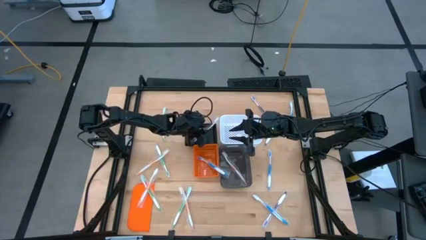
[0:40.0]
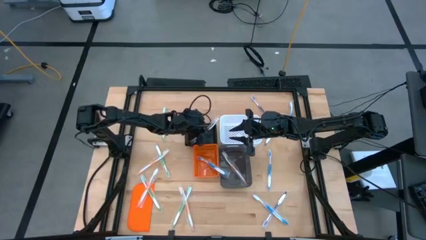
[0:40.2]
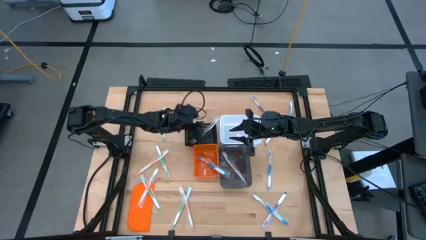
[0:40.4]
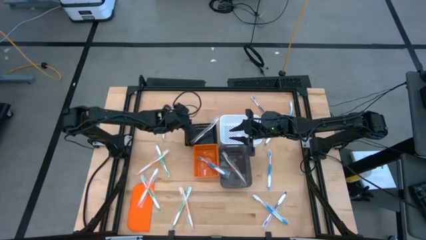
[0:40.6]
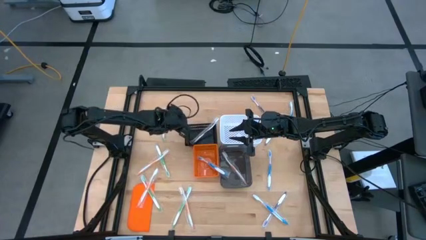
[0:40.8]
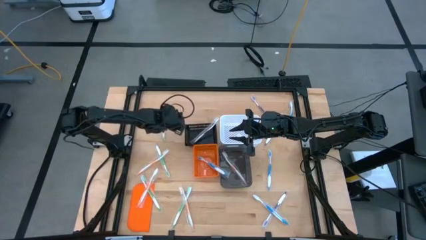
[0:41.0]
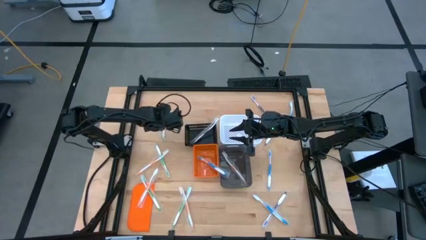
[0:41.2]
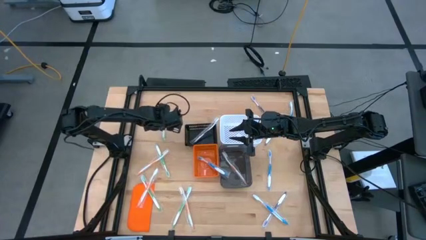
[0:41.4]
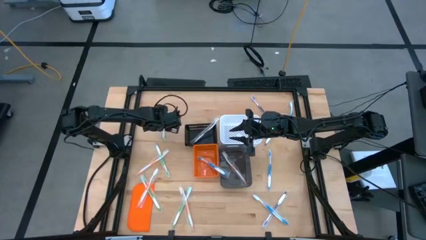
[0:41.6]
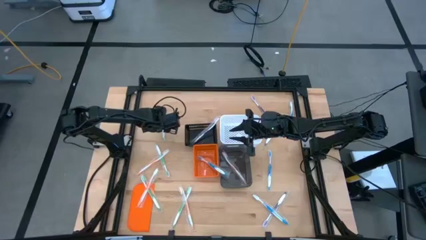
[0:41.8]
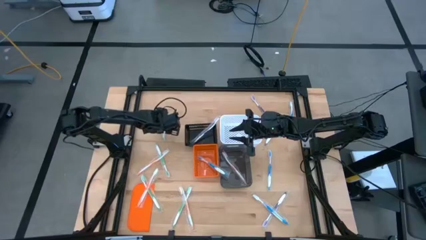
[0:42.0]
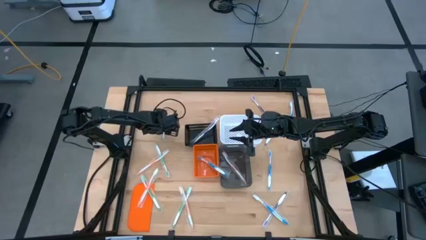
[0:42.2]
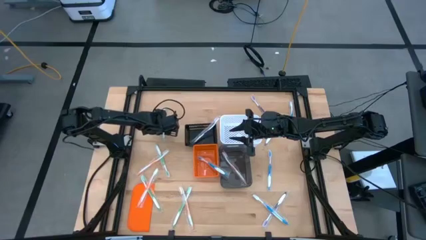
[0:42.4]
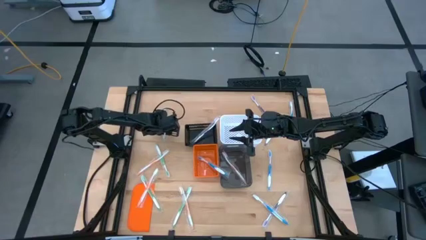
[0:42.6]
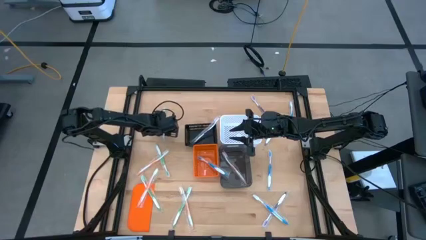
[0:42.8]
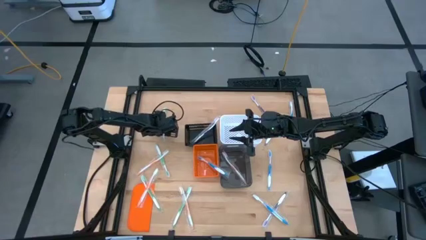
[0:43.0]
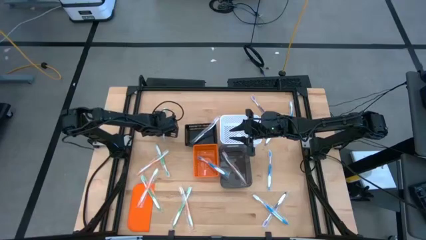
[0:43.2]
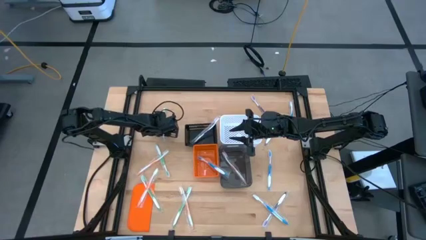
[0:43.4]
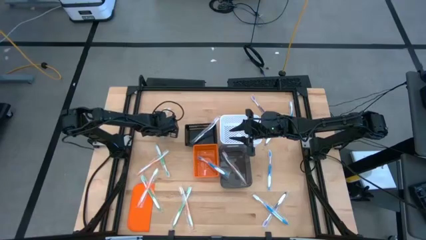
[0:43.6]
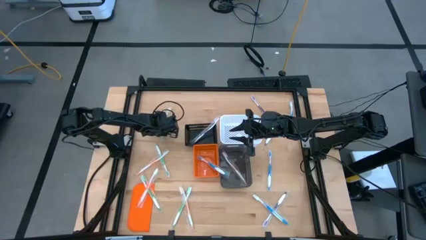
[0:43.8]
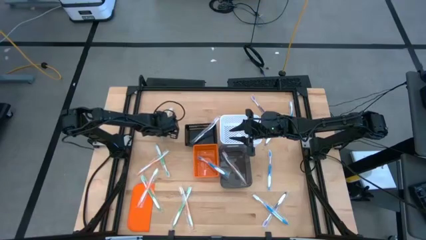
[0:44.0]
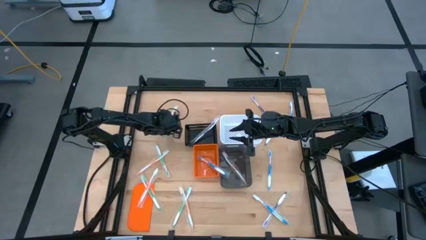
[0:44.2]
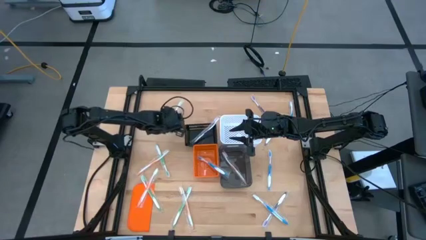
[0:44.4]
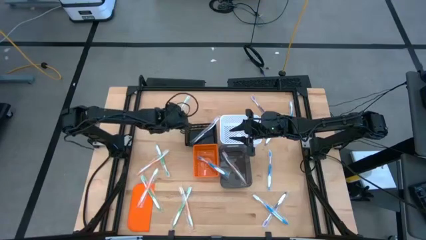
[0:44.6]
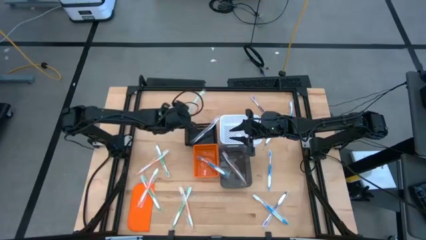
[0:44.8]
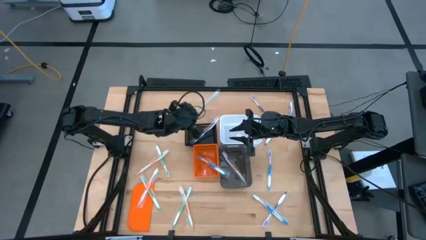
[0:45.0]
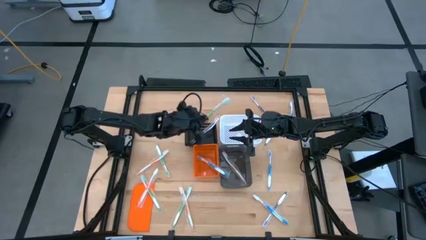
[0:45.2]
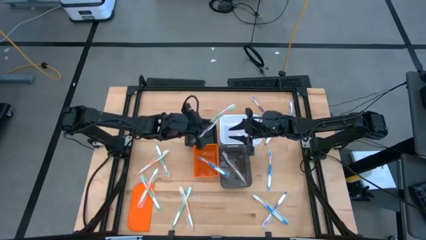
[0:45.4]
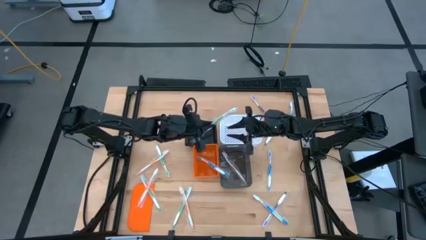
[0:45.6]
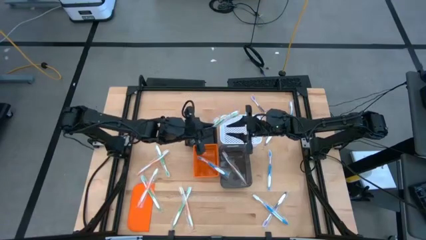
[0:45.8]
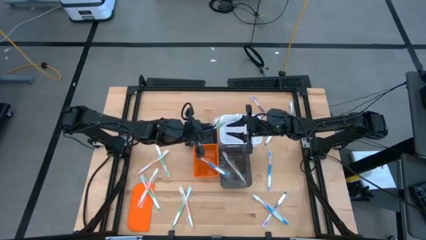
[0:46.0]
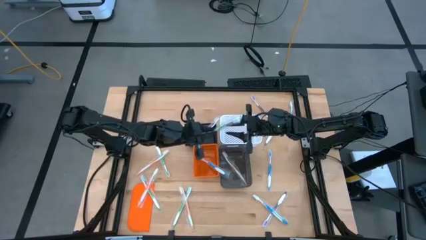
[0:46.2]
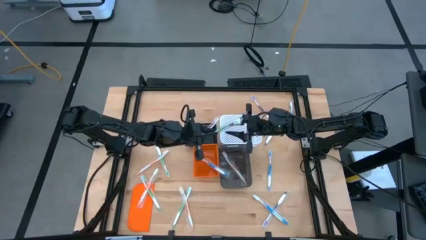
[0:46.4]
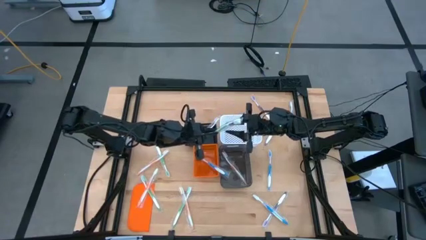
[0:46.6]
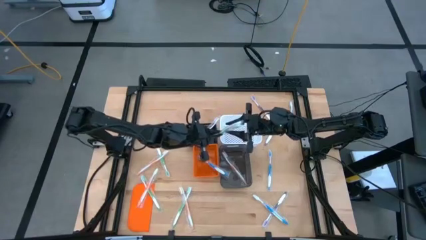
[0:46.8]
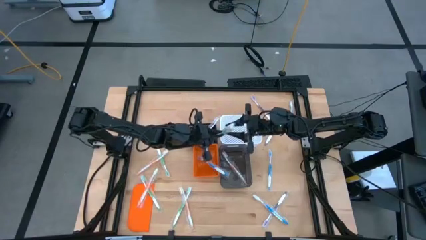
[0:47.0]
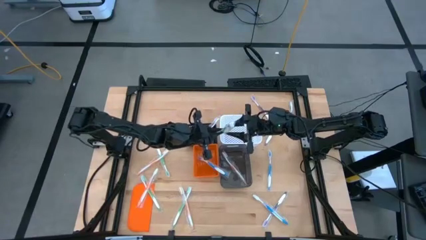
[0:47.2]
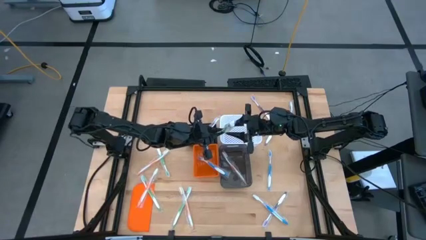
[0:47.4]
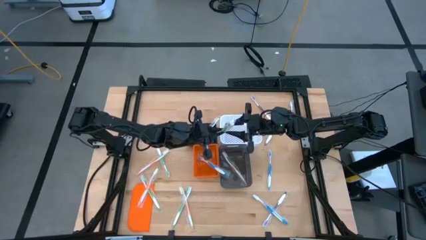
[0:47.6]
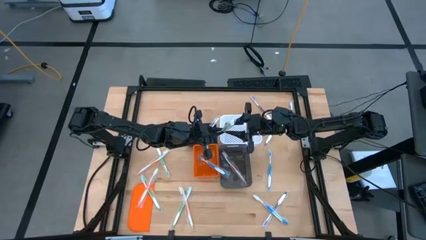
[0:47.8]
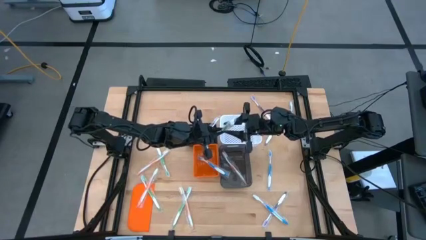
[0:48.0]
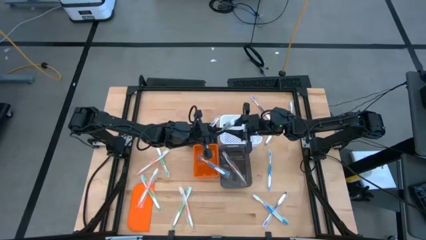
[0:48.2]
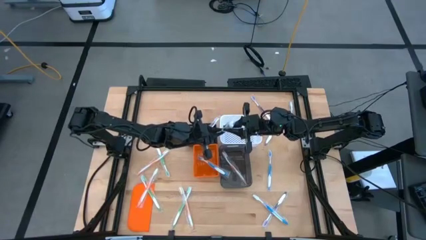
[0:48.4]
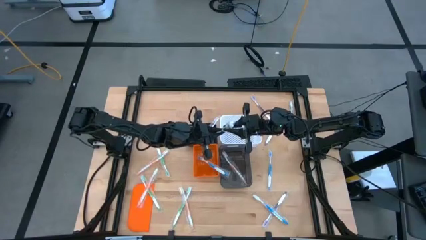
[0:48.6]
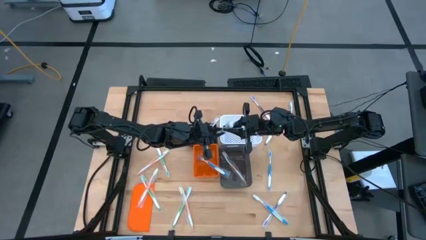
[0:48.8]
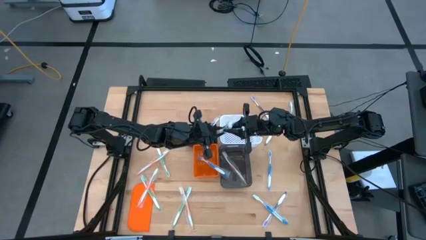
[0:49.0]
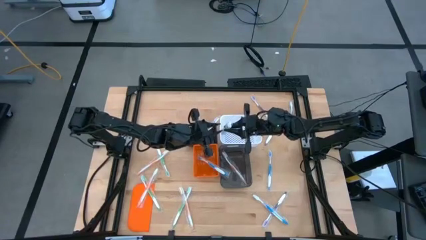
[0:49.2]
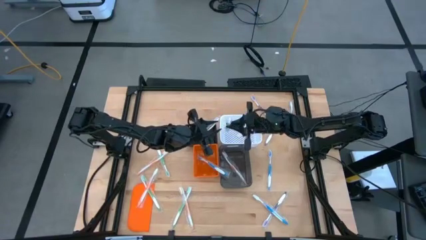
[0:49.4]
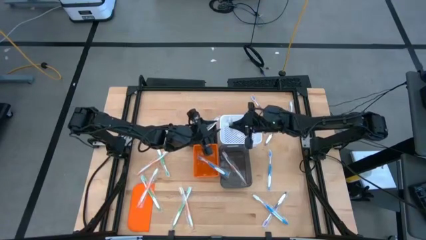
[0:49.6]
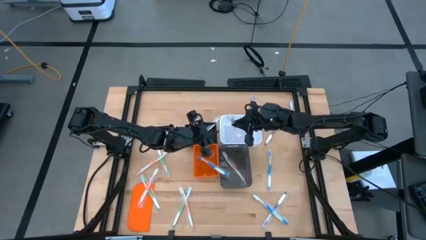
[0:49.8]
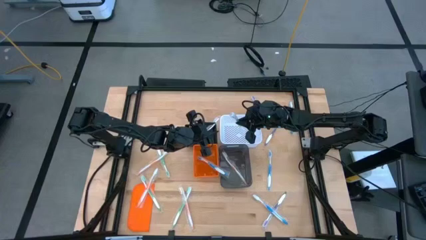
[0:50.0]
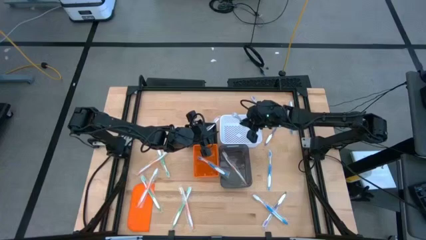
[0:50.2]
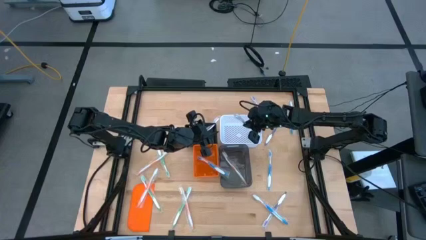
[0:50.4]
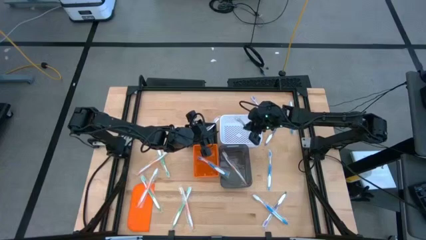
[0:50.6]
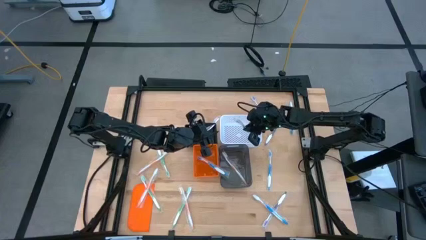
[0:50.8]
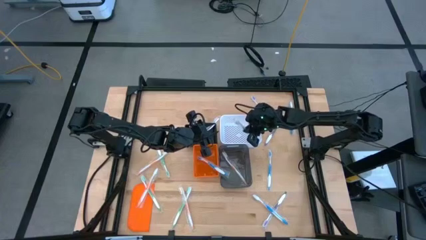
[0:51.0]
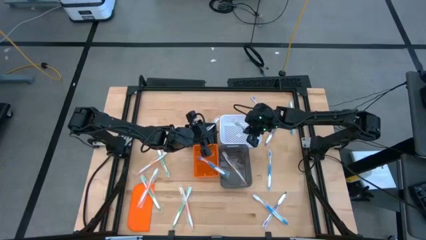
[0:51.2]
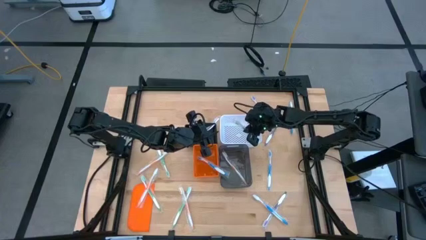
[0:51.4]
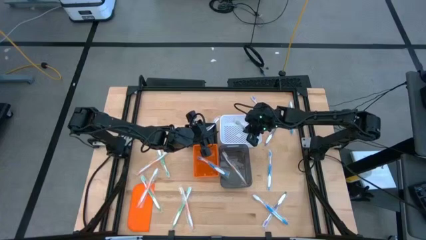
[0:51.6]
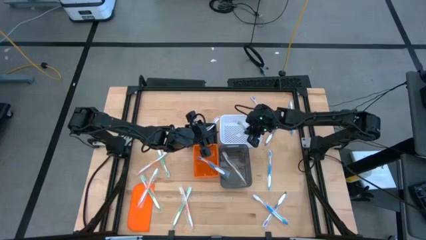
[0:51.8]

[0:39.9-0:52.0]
Task: Pick & Place Toothbrushes
Put the green toothbrush into the white bin

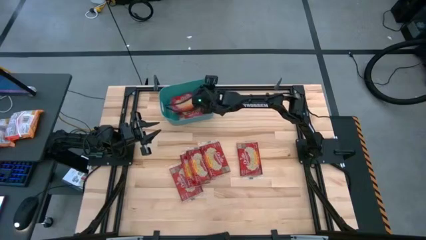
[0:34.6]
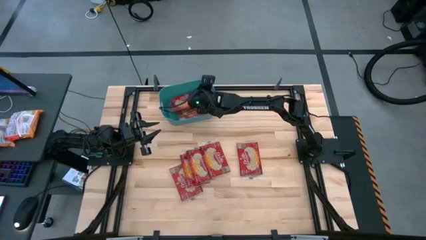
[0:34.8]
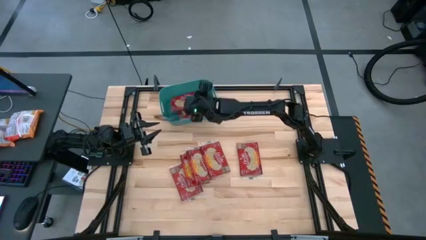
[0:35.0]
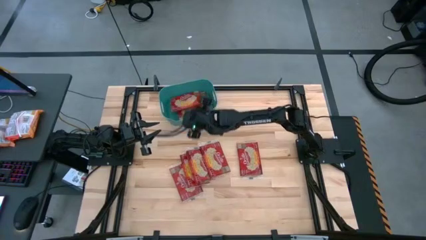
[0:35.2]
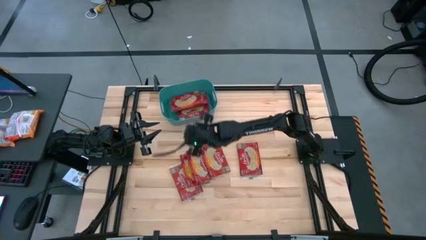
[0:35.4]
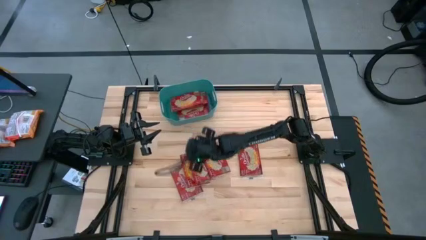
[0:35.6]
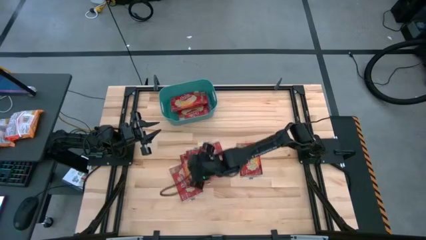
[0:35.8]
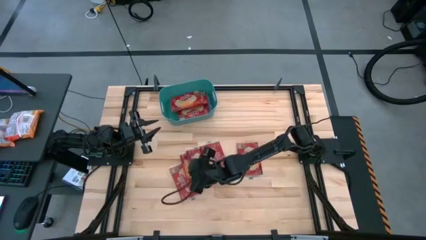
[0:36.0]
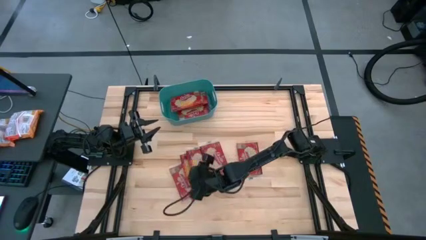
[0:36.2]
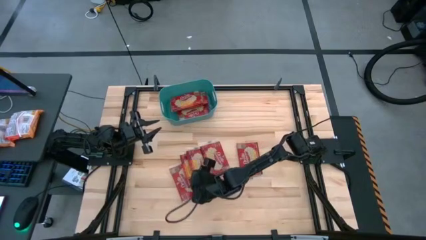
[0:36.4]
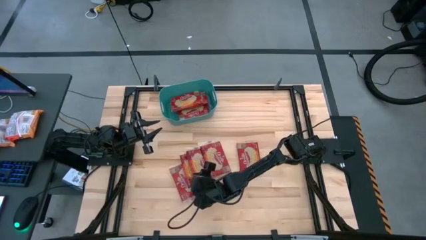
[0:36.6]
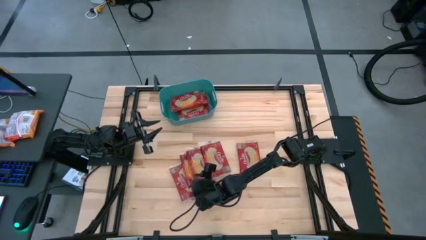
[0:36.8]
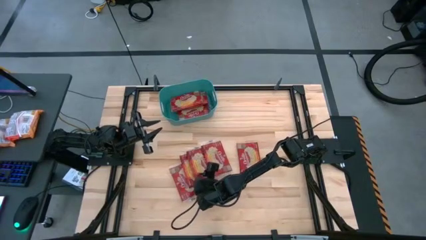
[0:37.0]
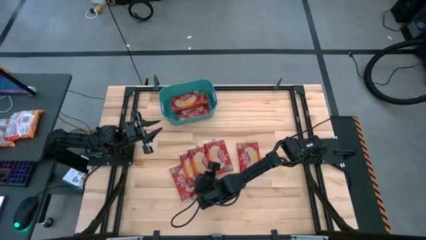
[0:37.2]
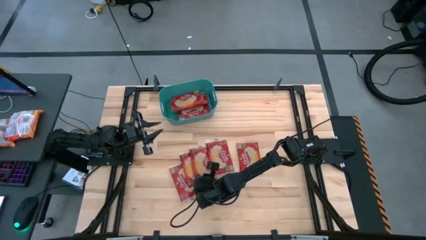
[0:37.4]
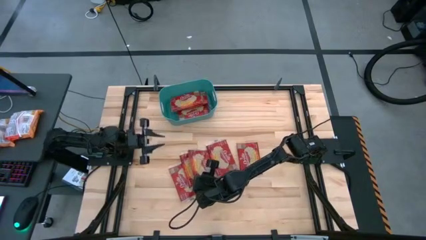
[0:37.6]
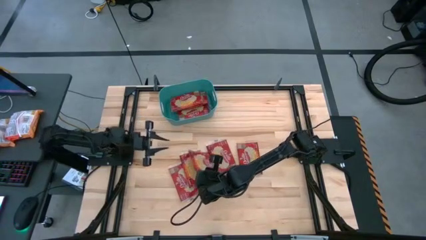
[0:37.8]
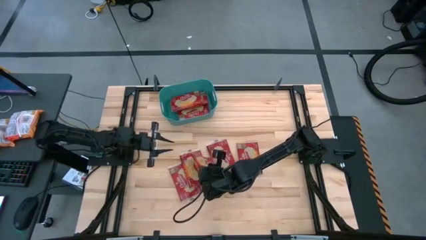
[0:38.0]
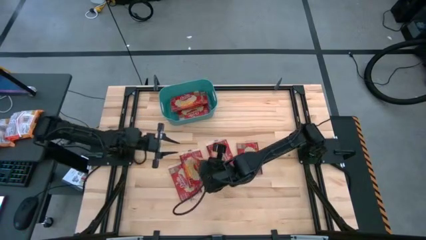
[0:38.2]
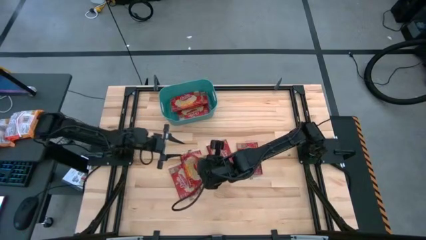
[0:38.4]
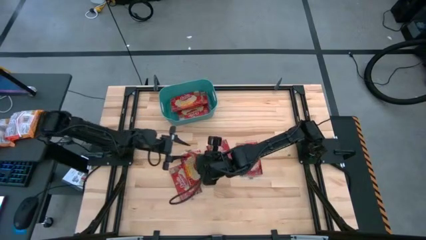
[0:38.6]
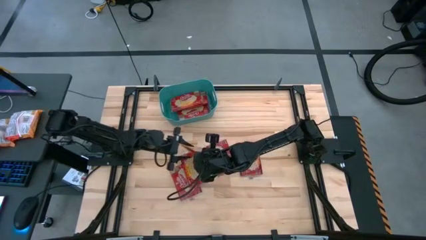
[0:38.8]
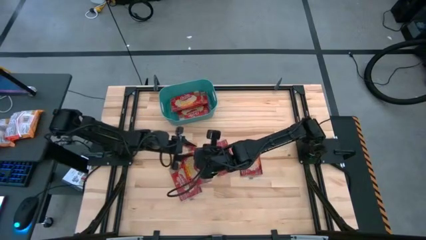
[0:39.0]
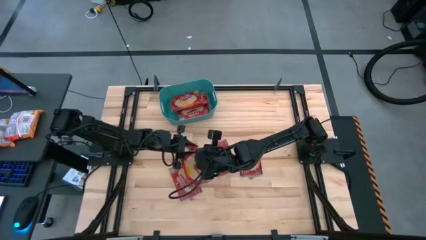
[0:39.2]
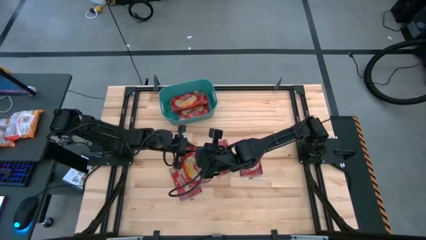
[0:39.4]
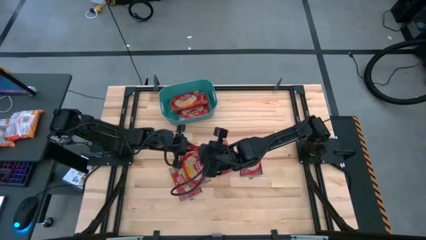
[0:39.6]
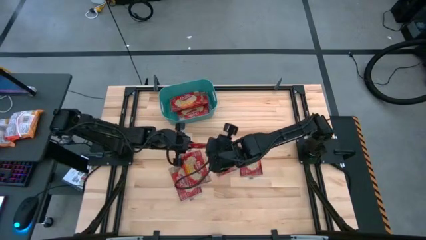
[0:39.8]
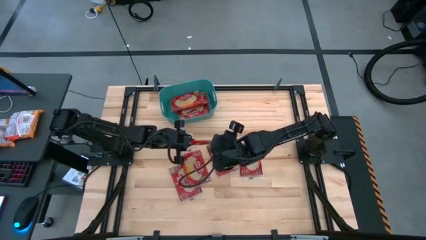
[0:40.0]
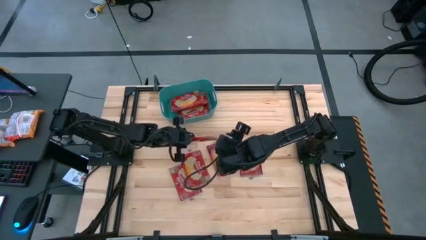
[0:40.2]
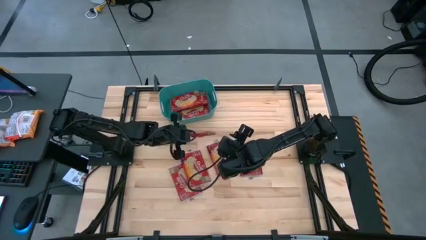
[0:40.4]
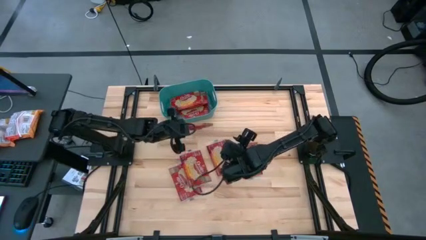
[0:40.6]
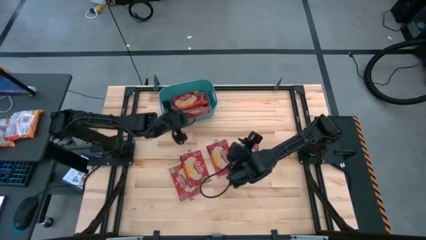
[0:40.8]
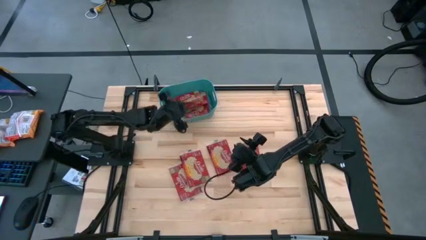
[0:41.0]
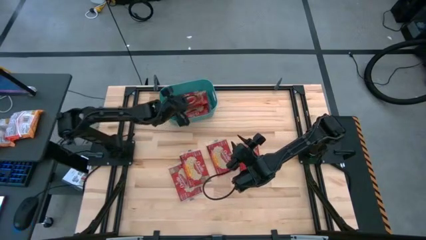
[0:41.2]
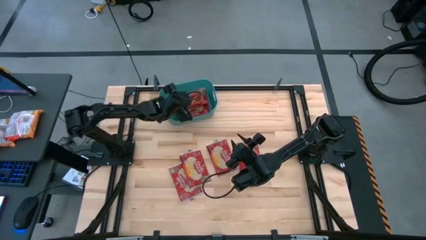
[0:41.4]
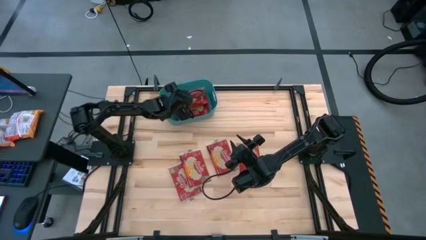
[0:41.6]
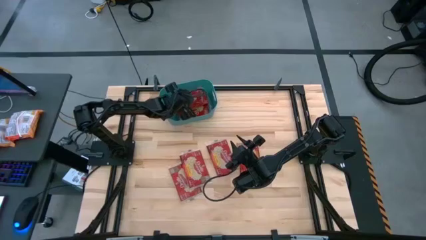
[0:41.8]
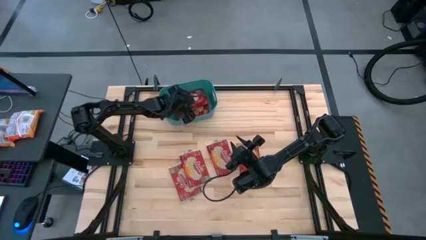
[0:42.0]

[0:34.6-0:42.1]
Task: Sort popcorn bags into baskets
Put the red popcorn bag into the blue container
